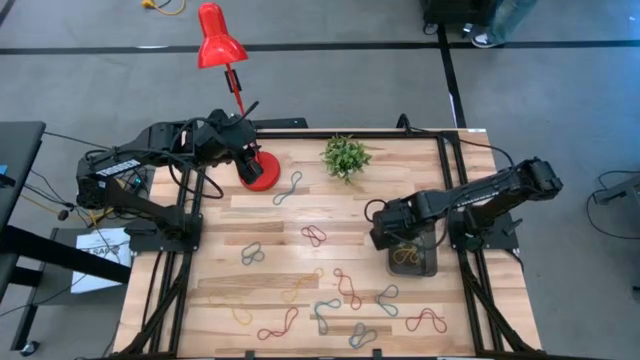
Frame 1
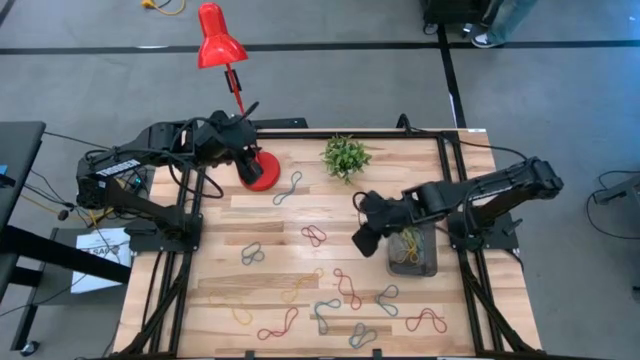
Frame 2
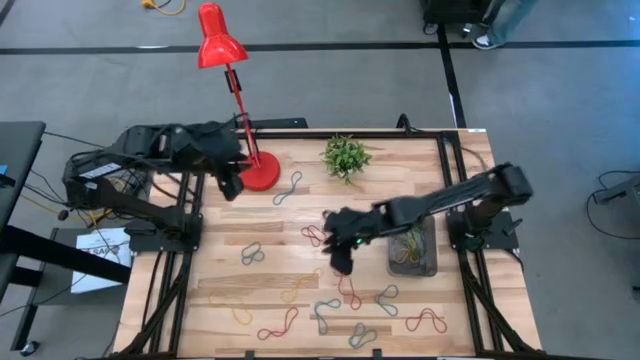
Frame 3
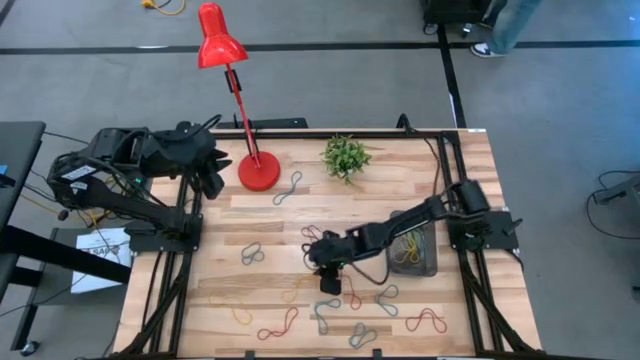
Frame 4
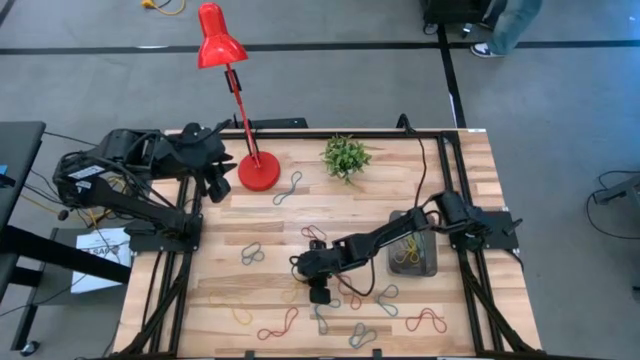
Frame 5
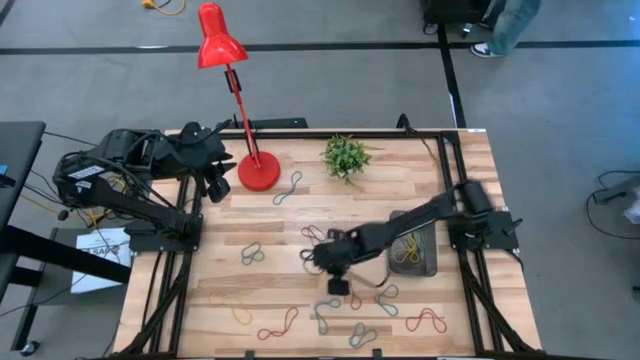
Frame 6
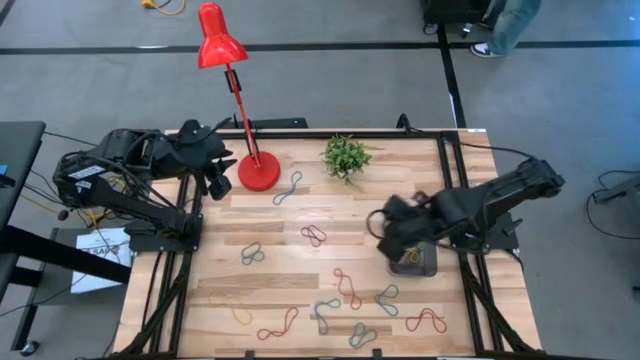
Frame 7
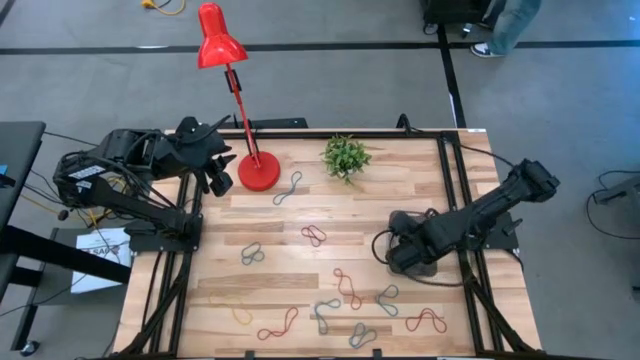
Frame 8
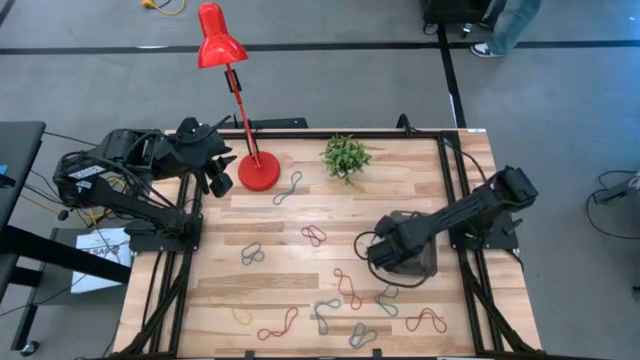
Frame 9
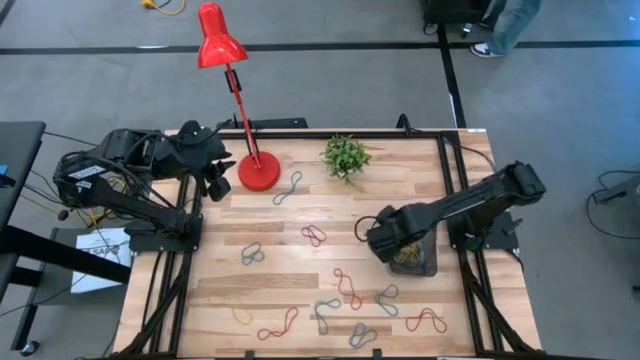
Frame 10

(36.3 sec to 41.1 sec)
Task: Pick and place items into bin
Put the yellow rubber band into the black bin

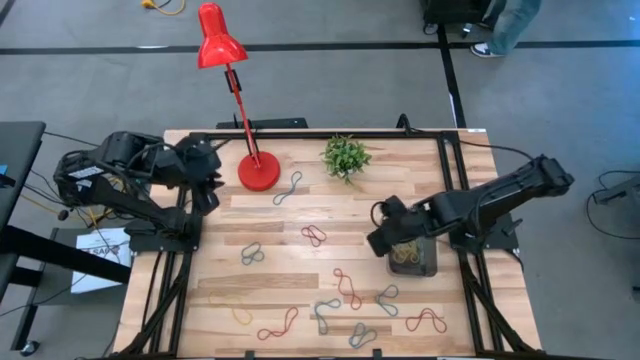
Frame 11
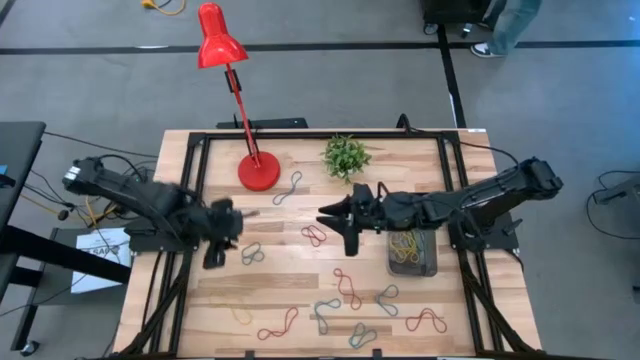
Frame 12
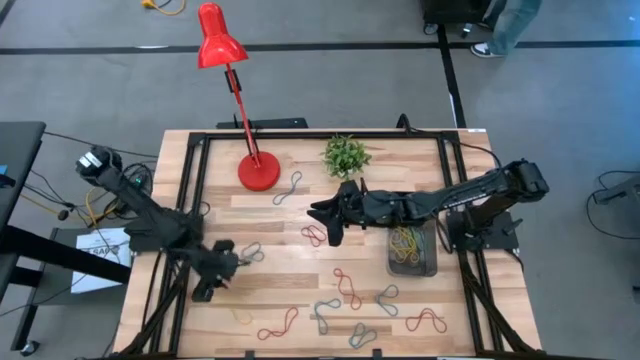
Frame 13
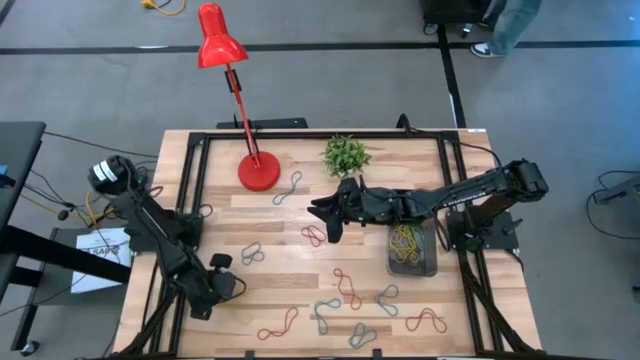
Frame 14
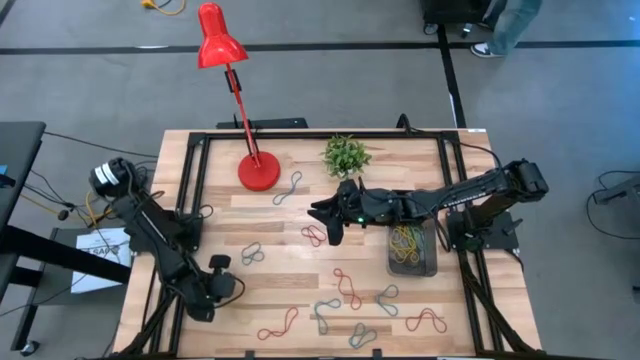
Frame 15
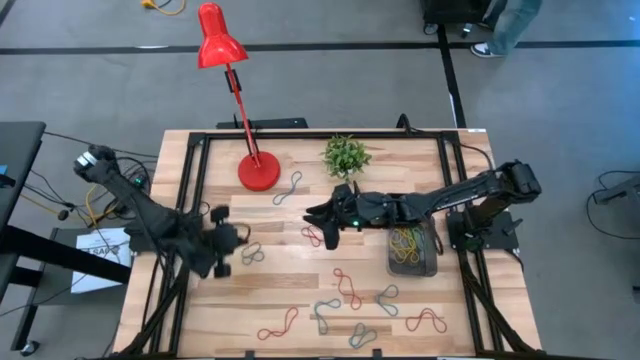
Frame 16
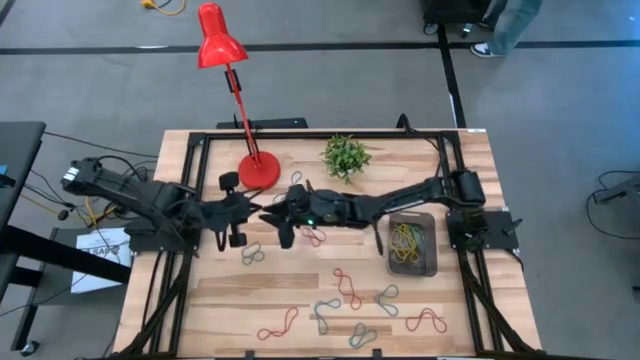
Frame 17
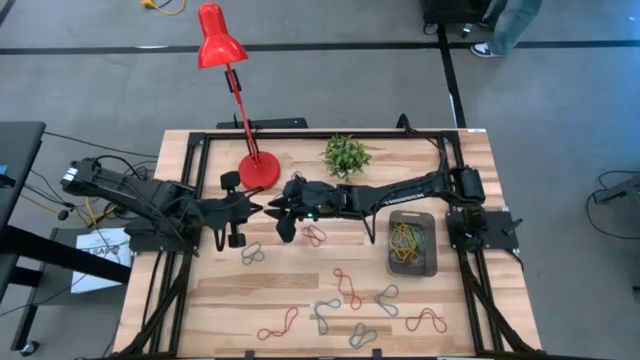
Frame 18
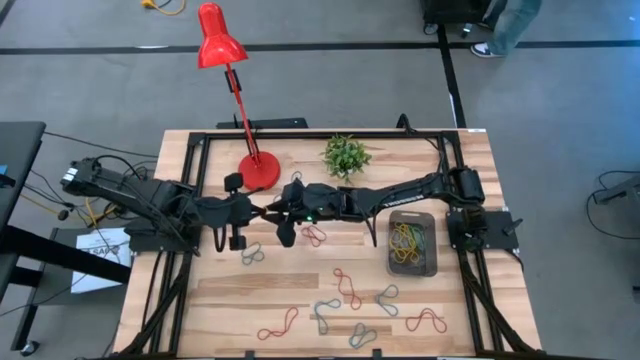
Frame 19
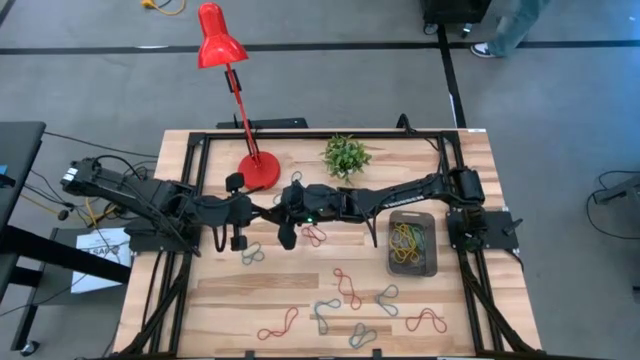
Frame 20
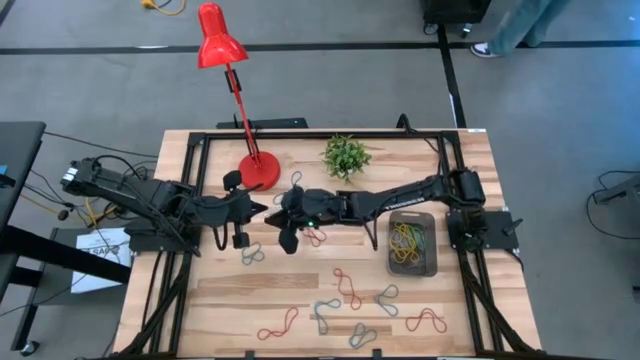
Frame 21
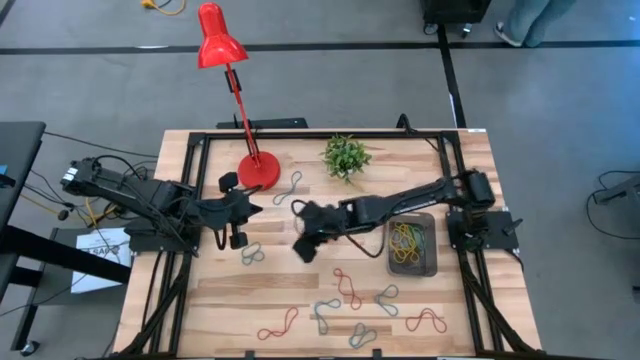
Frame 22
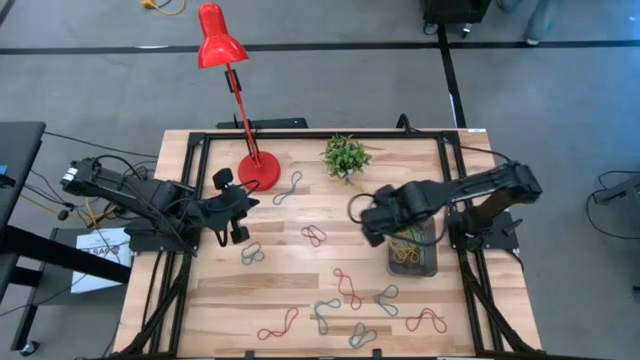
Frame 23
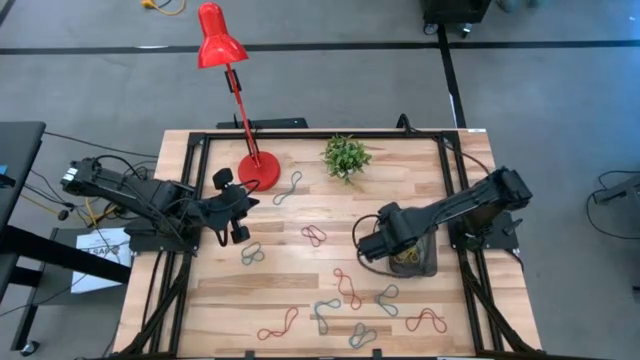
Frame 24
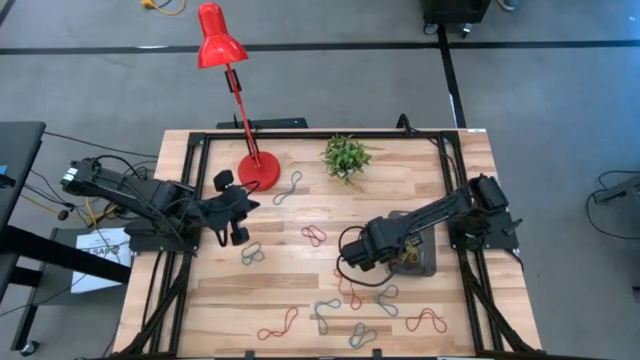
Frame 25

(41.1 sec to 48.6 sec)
Put the yellow rubber band into the black bin

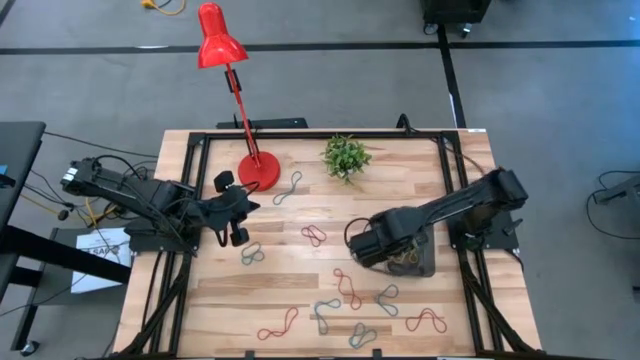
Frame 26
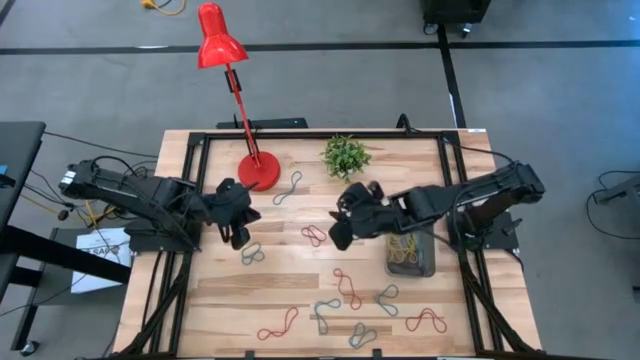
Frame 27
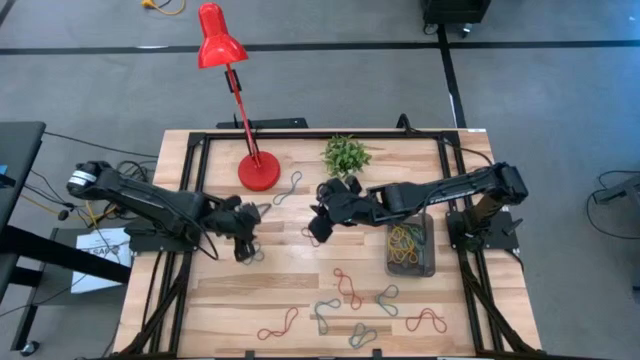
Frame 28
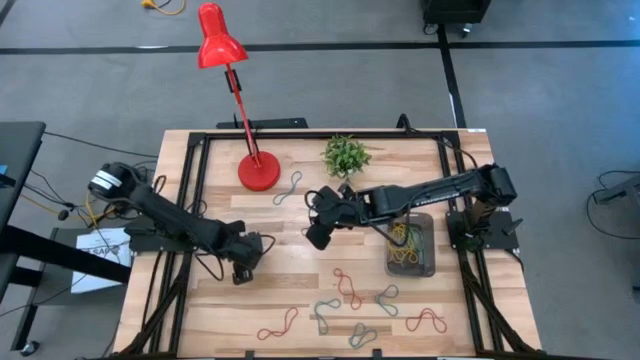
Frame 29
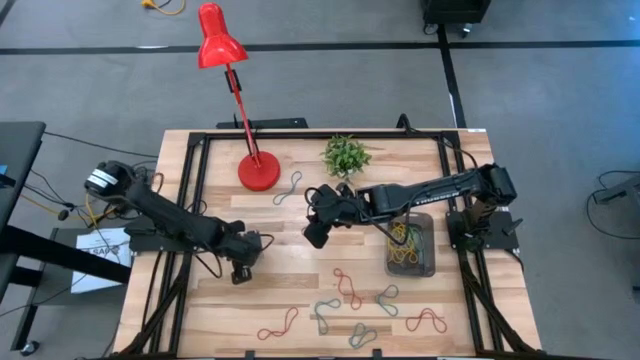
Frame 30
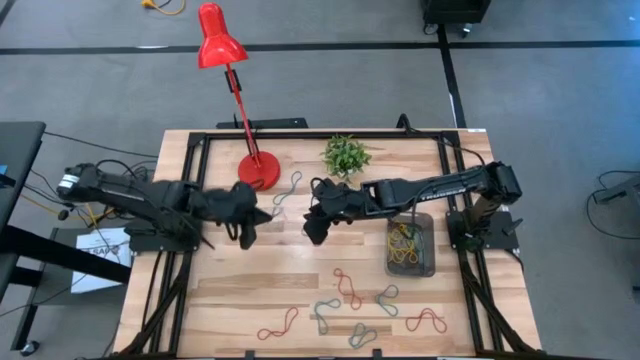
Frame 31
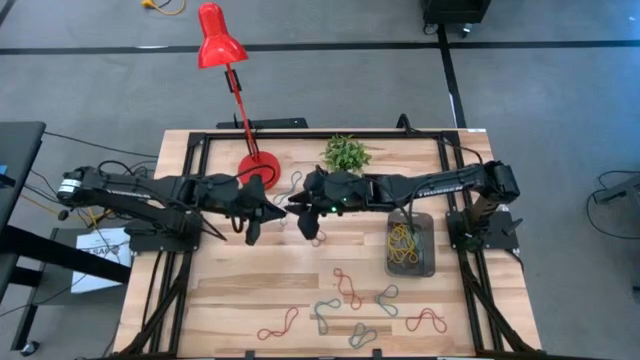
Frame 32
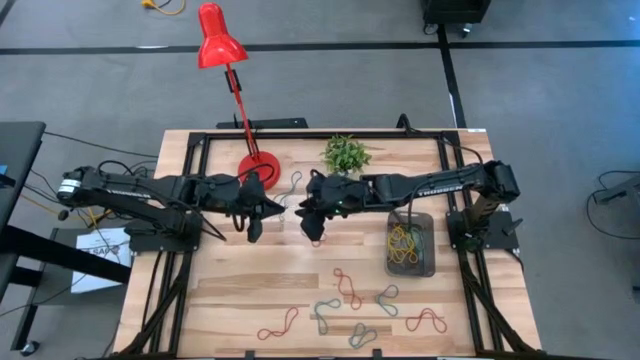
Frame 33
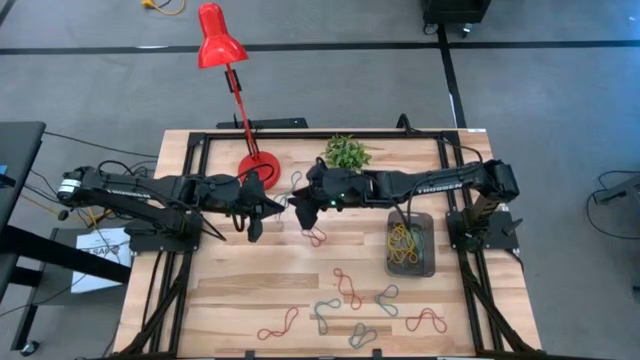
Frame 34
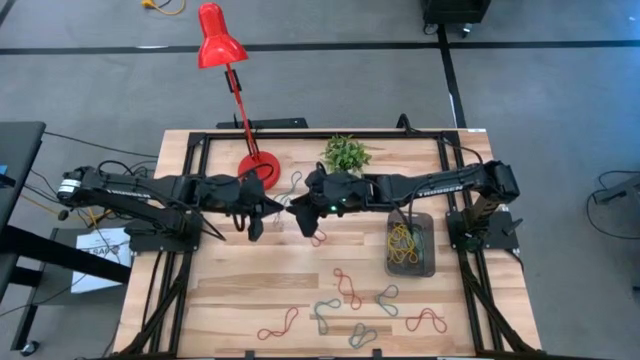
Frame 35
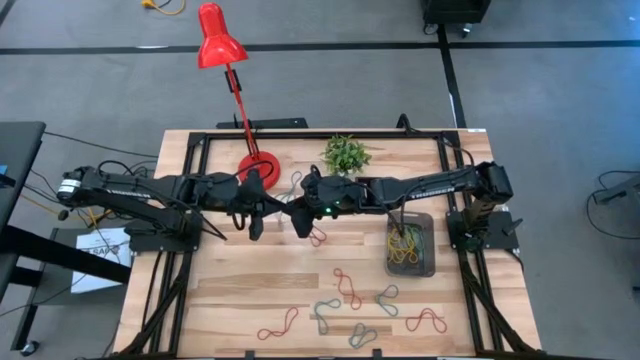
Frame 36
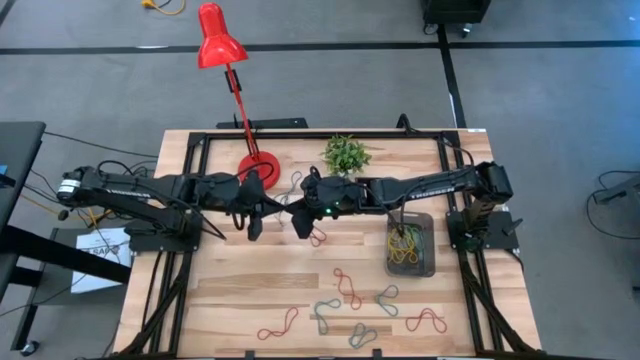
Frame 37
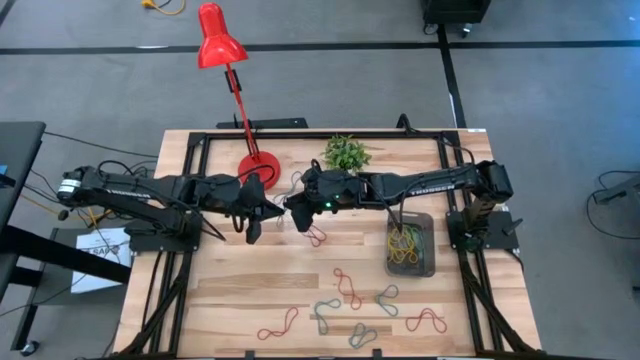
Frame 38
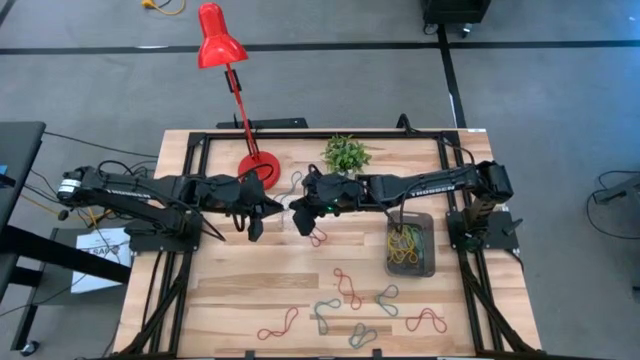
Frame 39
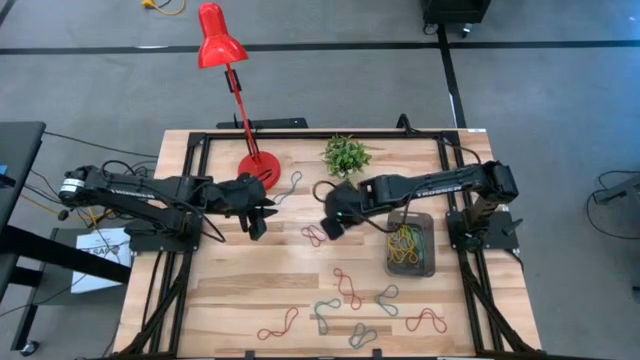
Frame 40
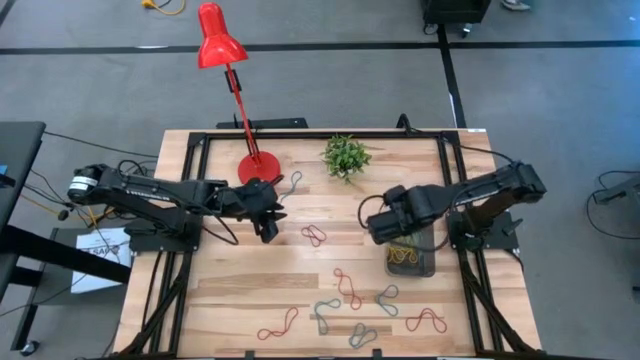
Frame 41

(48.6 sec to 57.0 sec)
Put the blue rubber band into the black bin

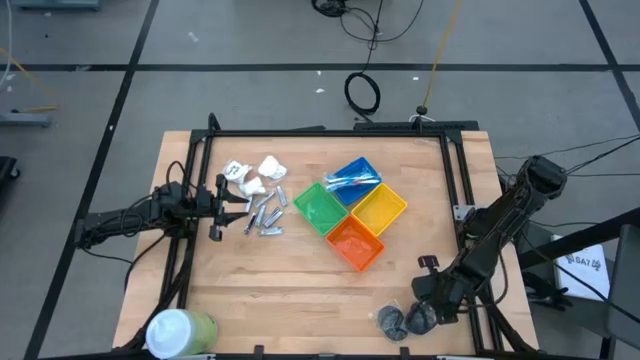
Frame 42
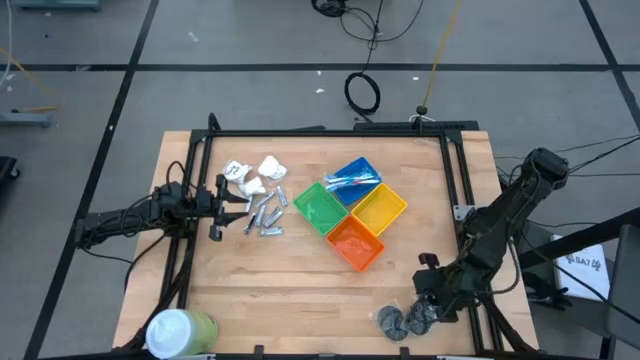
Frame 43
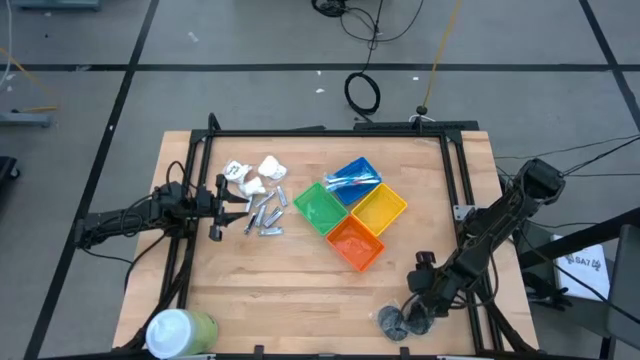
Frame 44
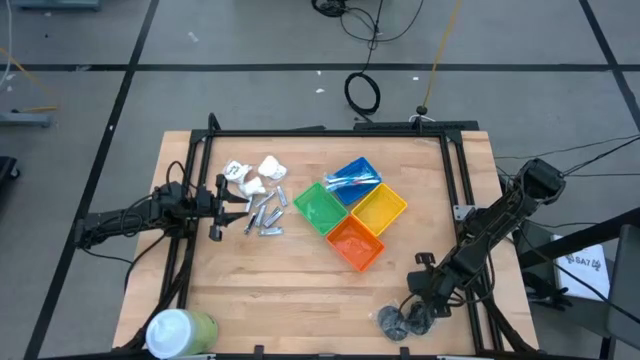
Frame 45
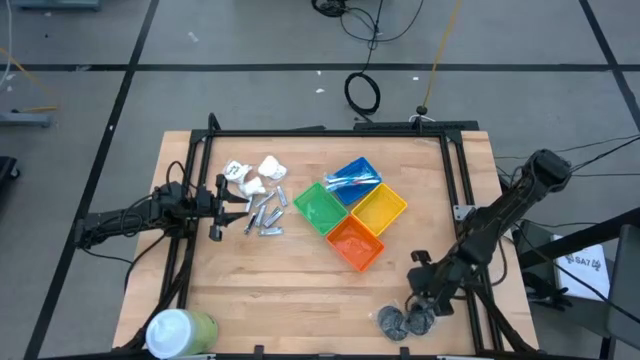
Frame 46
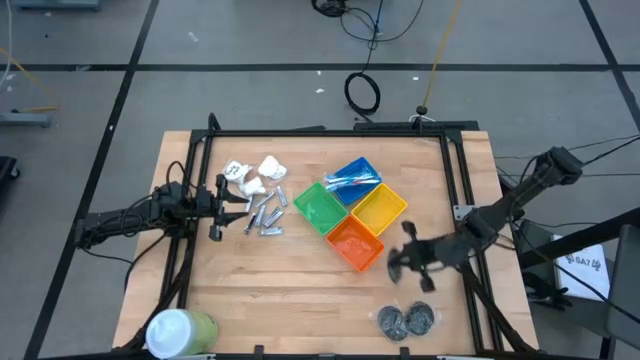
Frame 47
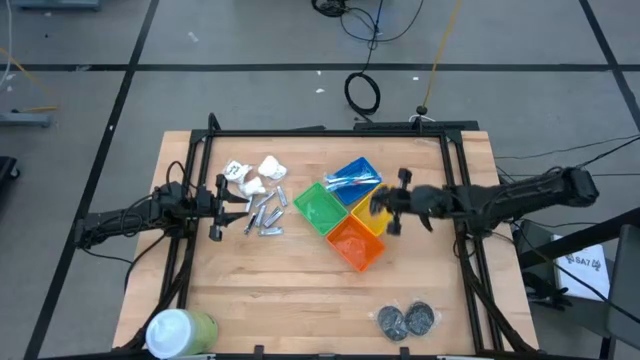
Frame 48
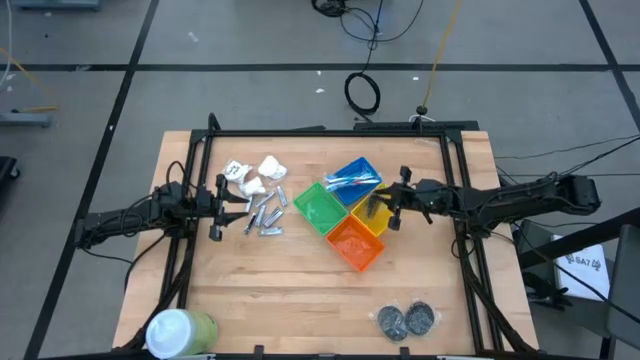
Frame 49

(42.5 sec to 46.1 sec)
Task: Pick & Place Travel size toiletries
Put the black hairbrush into the yellow bin
